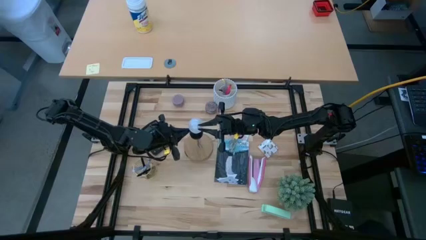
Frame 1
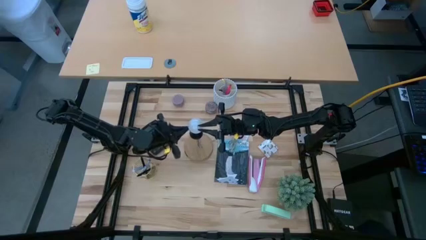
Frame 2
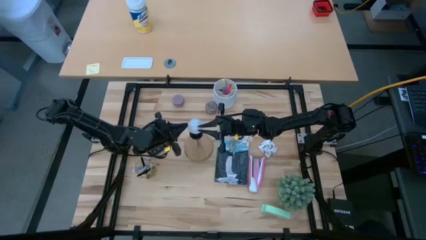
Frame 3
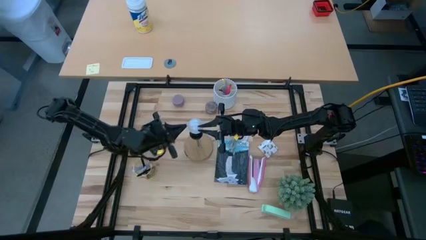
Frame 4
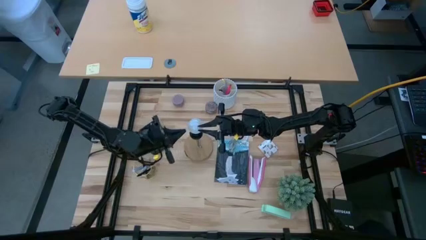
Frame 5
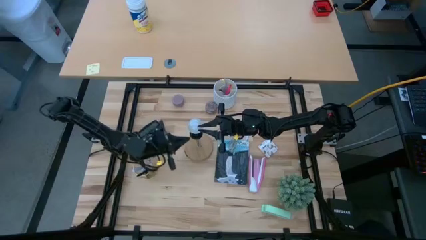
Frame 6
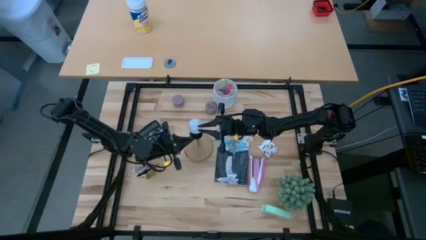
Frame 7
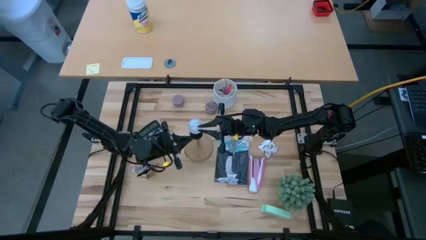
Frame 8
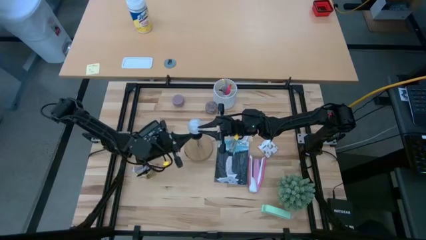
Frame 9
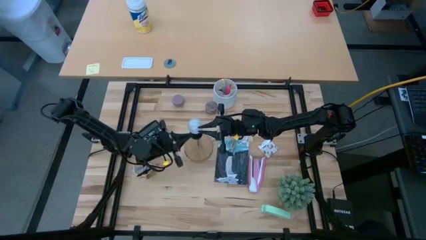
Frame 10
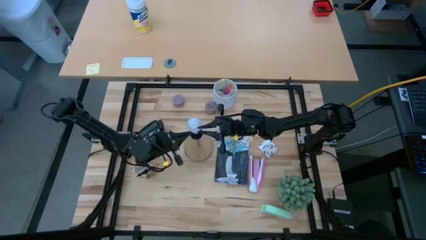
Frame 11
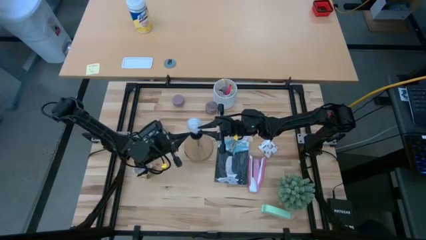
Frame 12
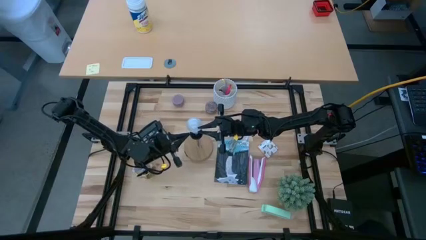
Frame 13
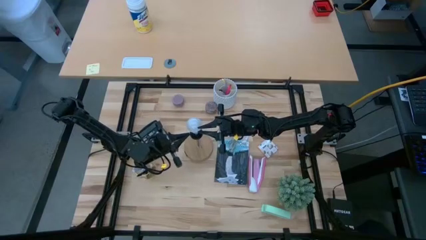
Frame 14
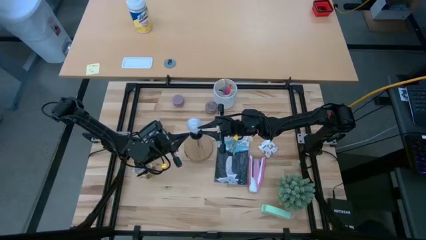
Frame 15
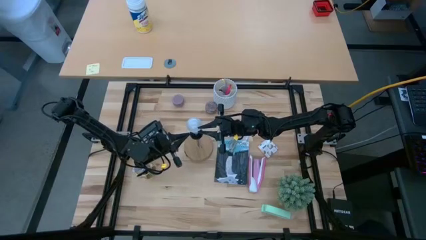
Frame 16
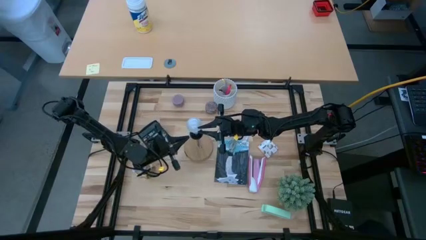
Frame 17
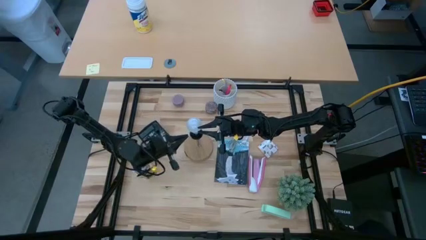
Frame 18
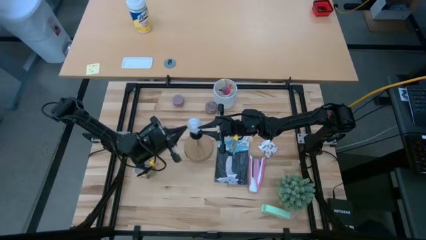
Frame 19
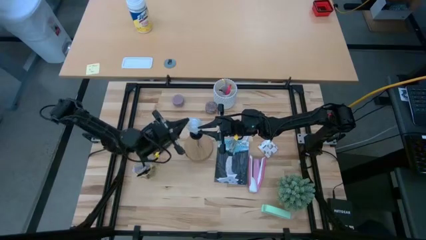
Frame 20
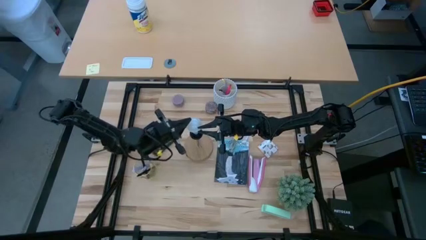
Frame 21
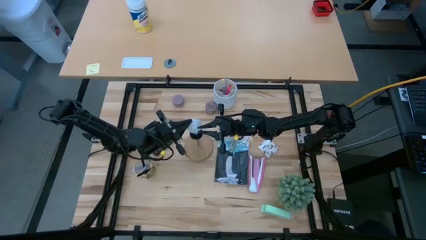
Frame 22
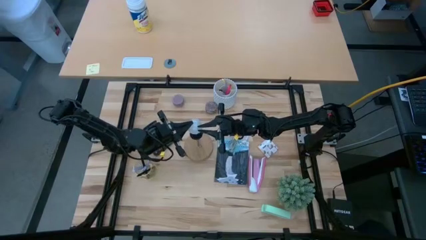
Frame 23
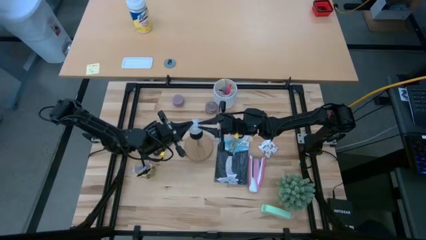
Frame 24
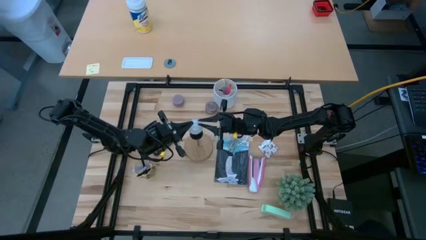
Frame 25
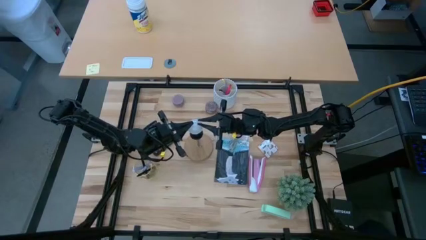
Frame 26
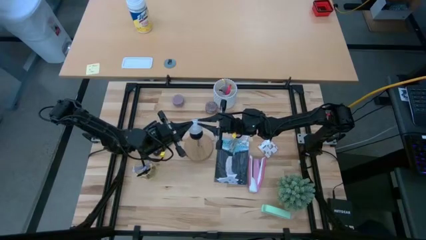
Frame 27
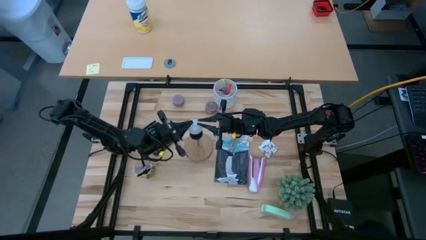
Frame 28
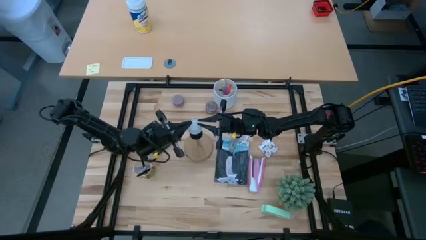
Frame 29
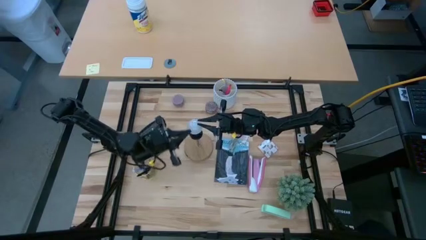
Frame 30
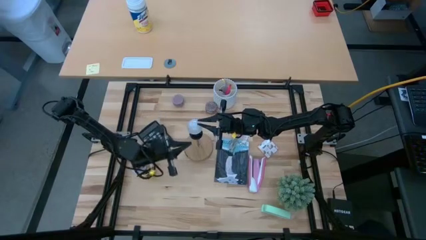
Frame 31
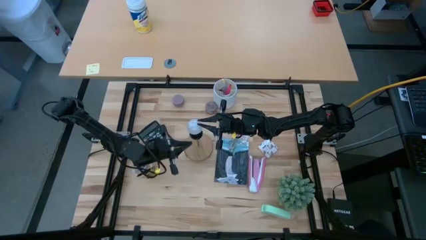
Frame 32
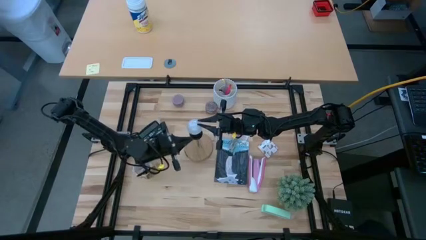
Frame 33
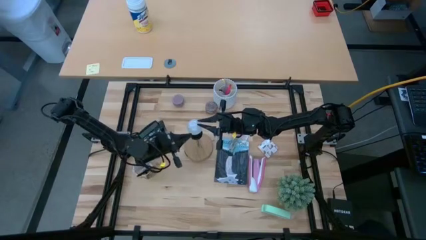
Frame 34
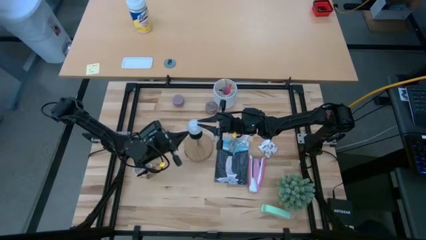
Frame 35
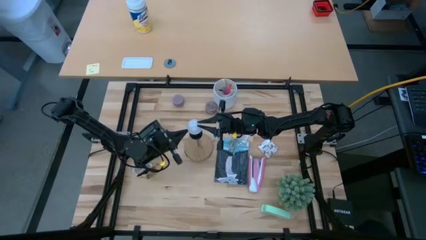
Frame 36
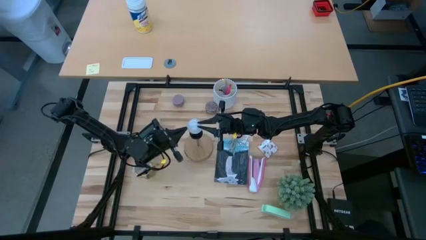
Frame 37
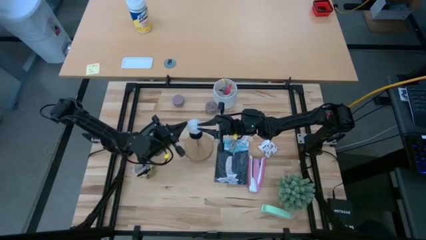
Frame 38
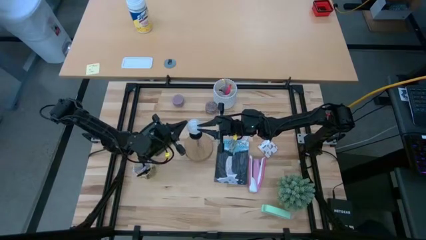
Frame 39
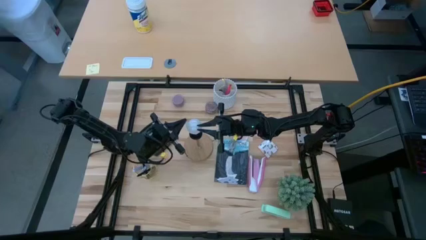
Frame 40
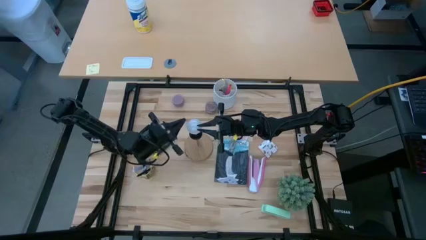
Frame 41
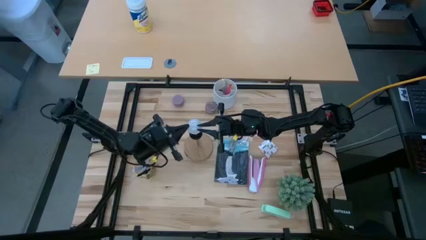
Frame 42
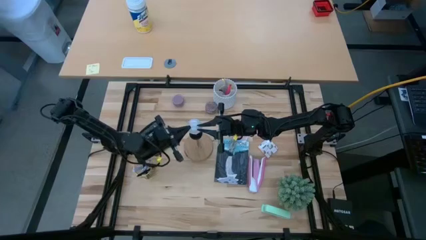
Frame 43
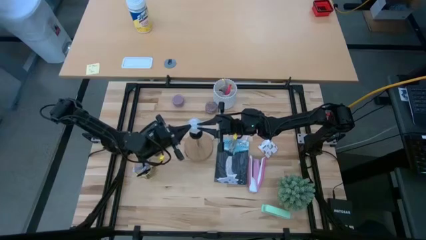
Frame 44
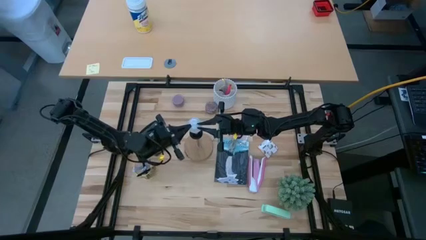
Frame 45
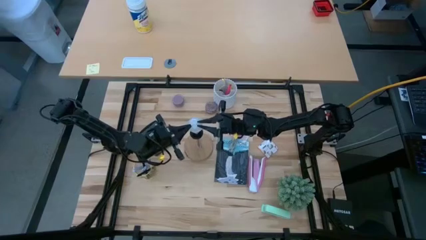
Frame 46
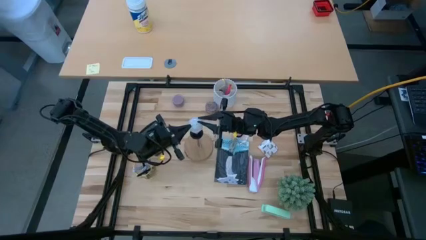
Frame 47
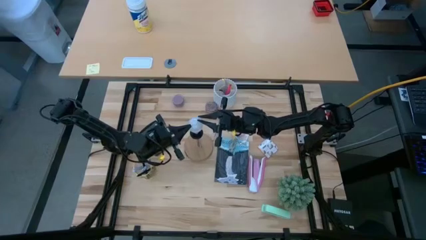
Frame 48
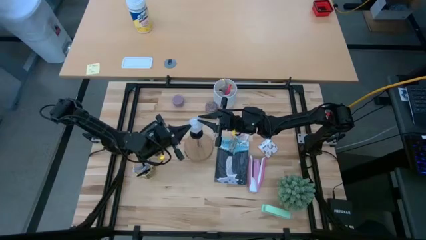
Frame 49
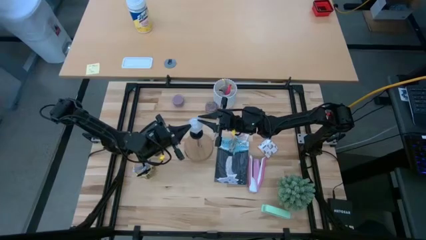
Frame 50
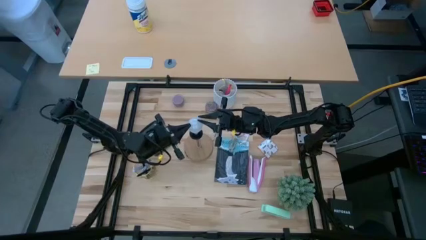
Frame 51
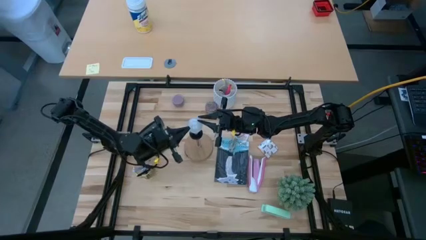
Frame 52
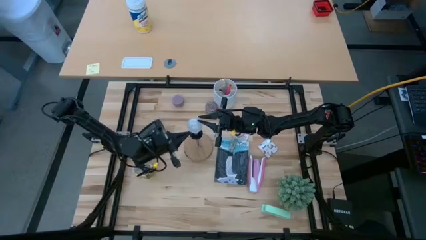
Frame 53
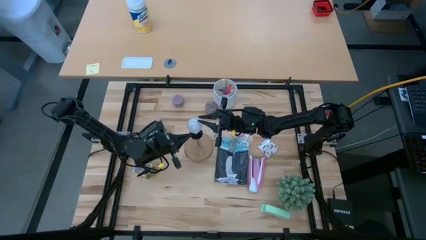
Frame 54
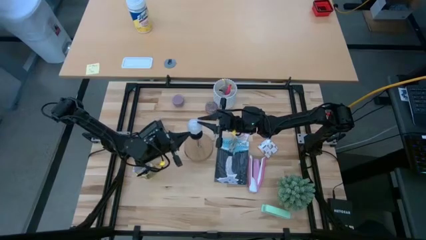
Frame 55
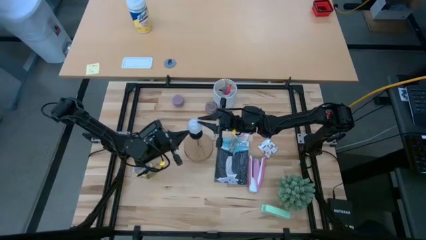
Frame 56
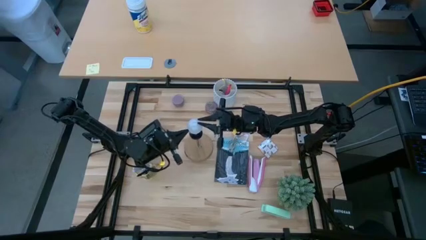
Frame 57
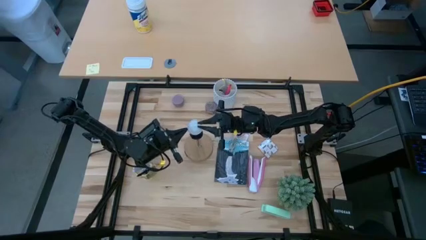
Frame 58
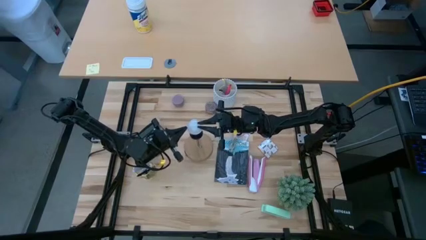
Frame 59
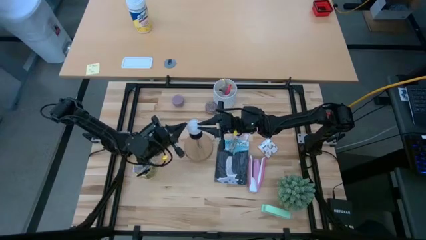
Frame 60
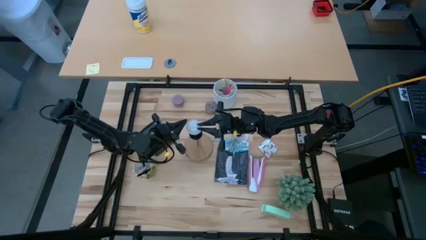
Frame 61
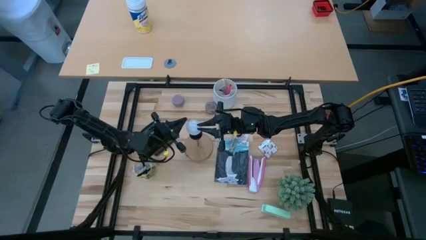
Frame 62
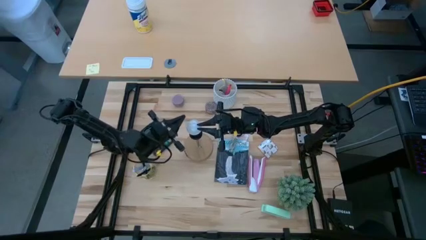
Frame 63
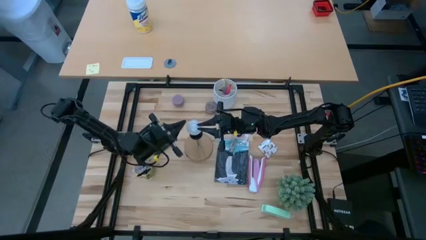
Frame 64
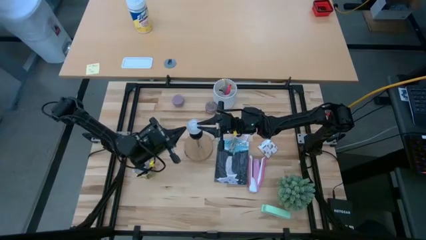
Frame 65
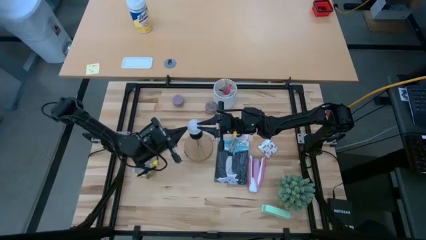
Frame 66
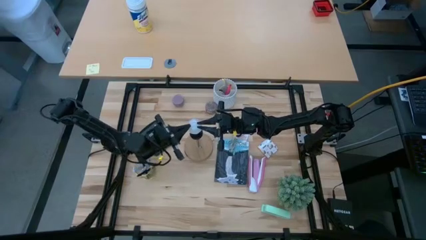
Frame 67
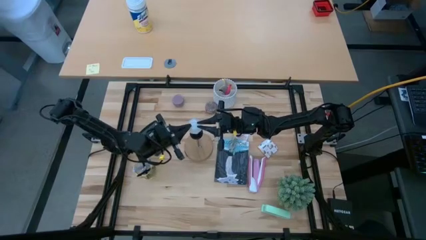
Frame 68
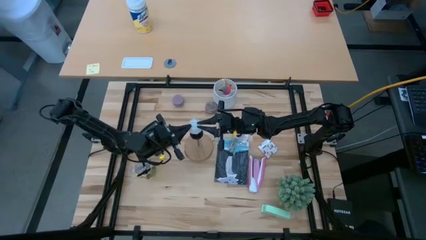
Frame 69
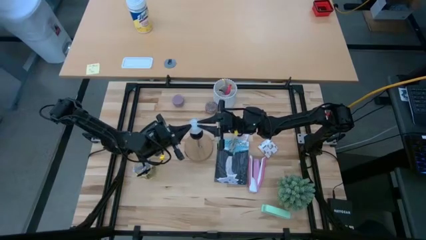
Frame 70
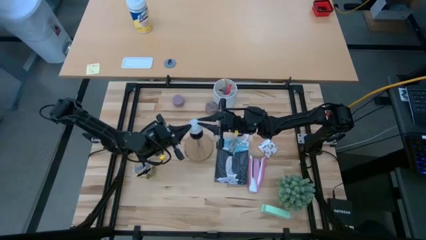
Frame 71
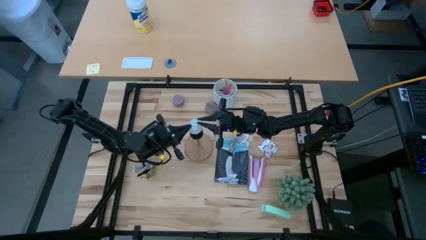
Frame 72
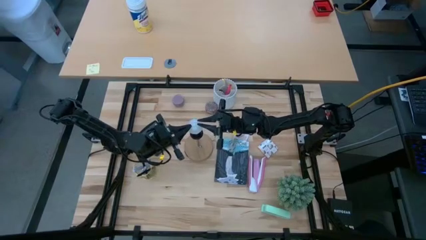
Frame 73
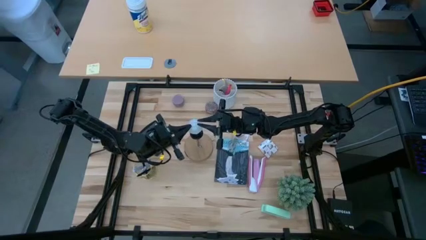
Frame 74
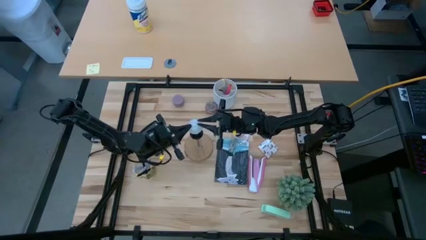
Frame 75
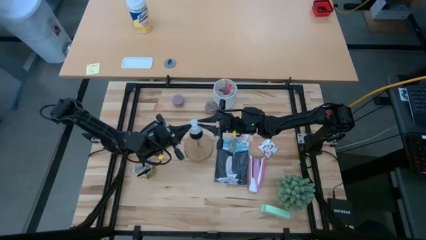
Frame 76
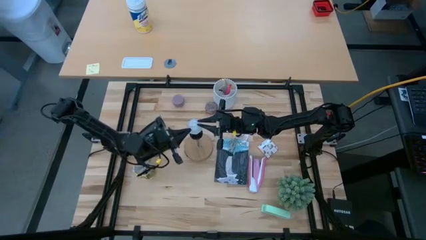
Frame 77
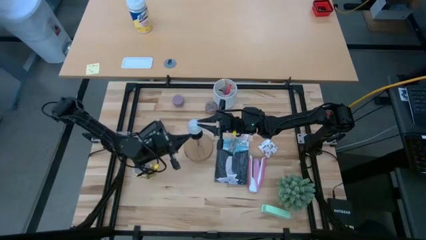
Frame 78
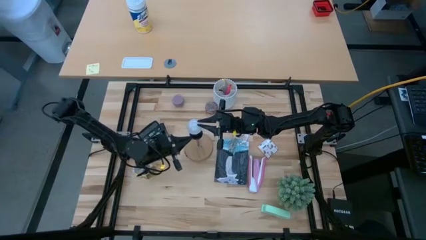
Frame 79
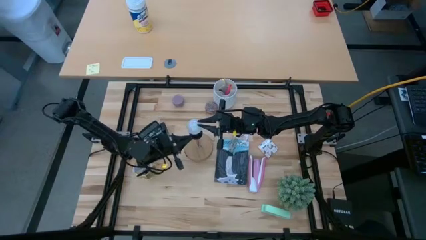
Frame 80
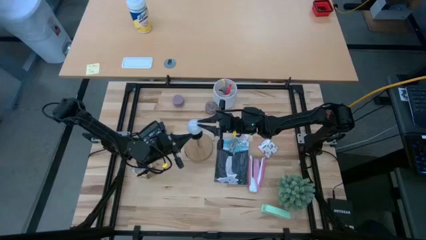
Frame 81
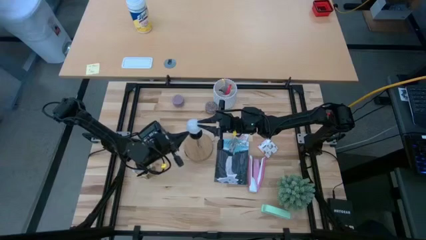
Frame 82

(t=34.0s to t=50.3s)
Task: Screw lightbulb
Insert the lightbulb into the lamp
